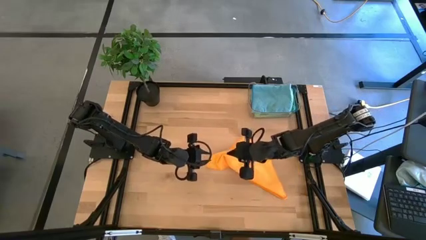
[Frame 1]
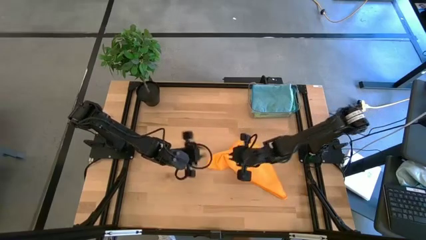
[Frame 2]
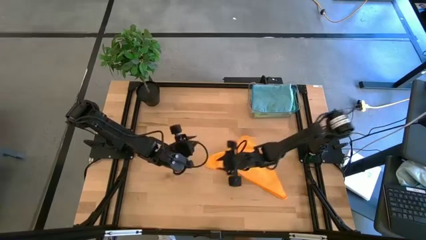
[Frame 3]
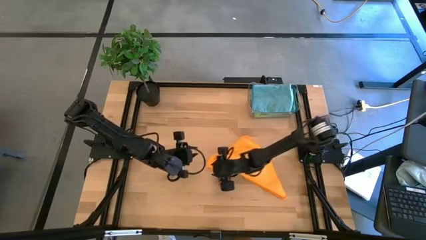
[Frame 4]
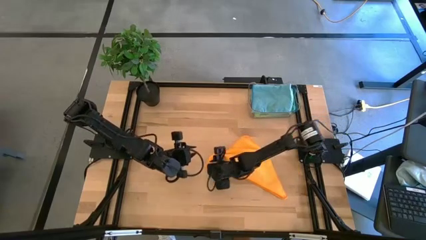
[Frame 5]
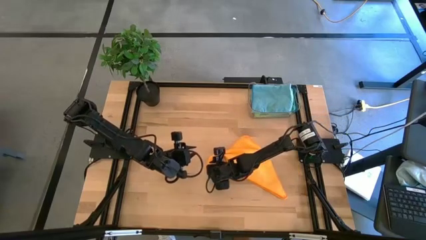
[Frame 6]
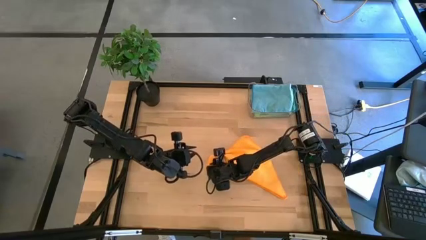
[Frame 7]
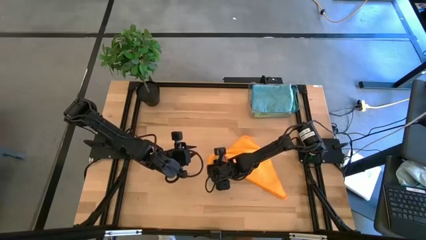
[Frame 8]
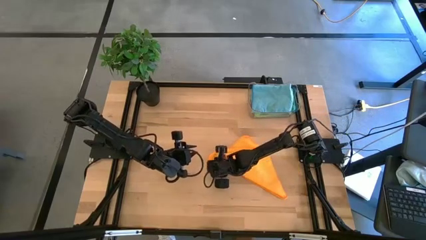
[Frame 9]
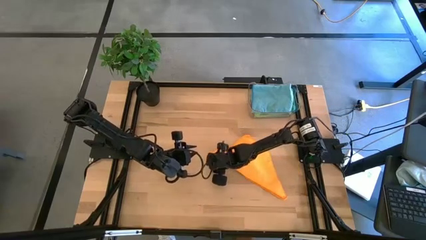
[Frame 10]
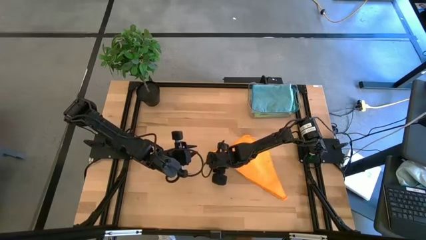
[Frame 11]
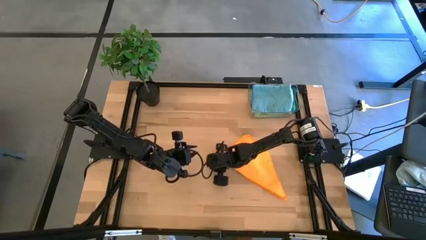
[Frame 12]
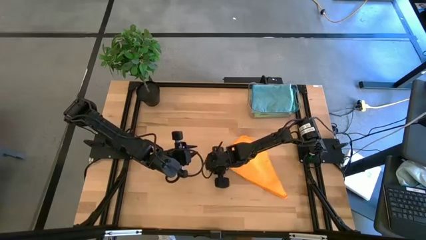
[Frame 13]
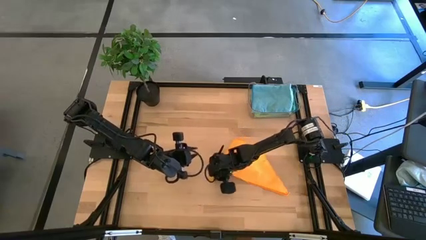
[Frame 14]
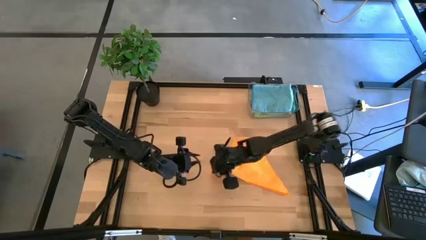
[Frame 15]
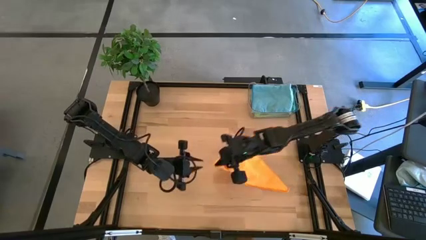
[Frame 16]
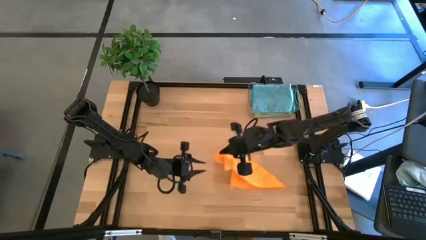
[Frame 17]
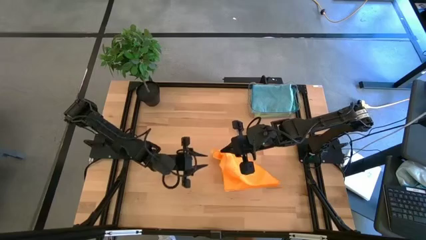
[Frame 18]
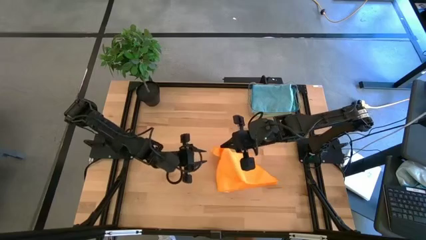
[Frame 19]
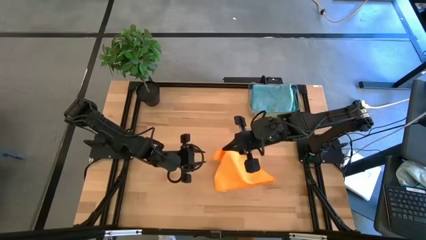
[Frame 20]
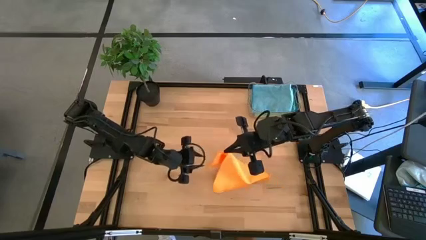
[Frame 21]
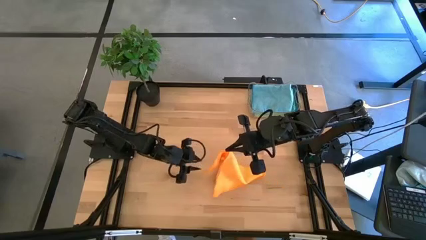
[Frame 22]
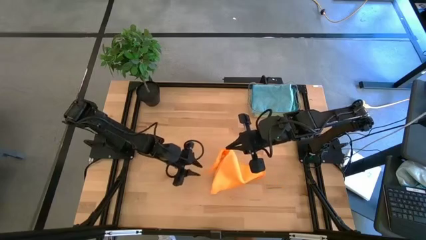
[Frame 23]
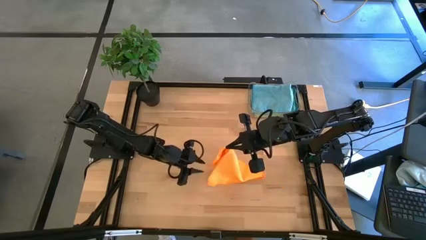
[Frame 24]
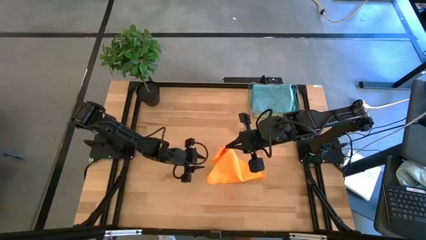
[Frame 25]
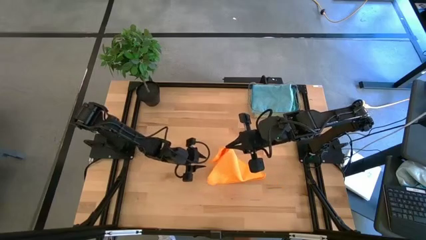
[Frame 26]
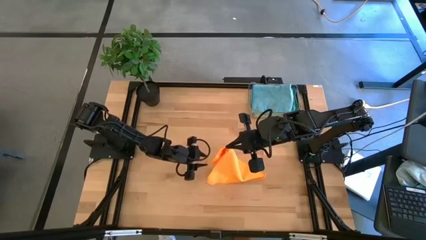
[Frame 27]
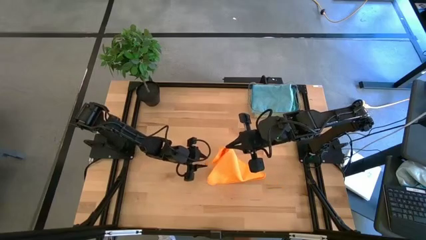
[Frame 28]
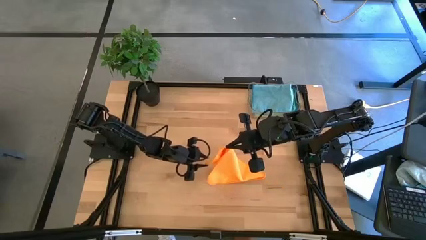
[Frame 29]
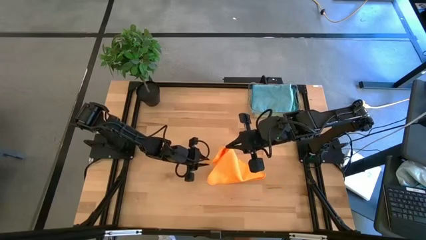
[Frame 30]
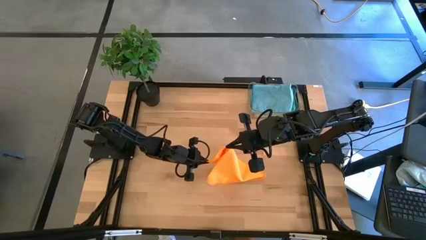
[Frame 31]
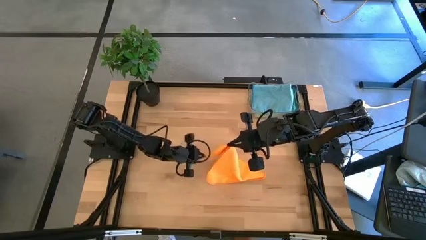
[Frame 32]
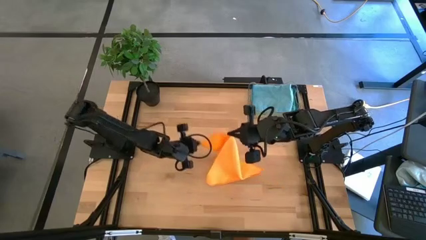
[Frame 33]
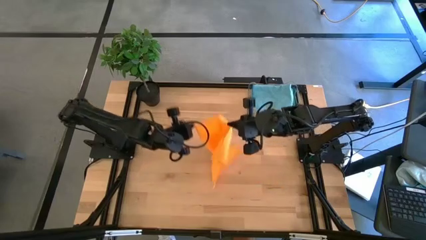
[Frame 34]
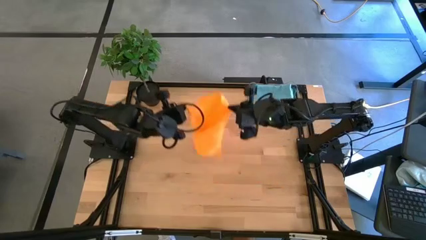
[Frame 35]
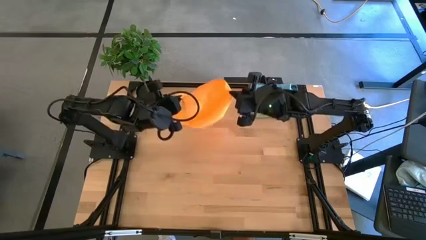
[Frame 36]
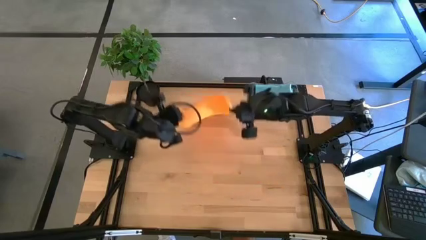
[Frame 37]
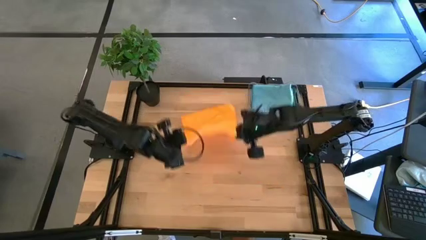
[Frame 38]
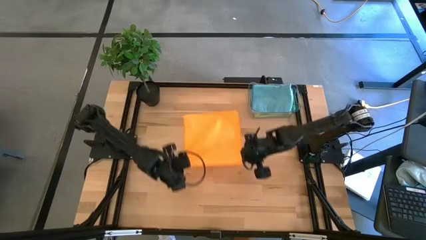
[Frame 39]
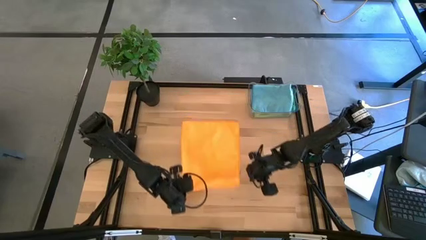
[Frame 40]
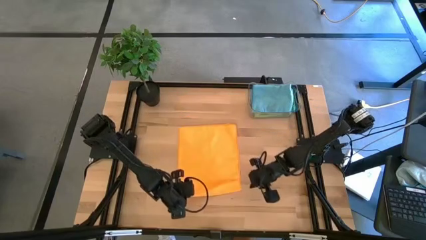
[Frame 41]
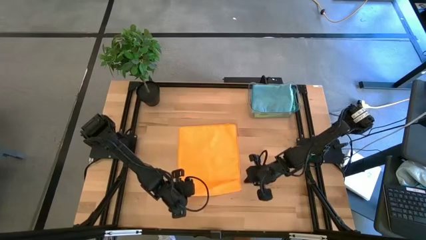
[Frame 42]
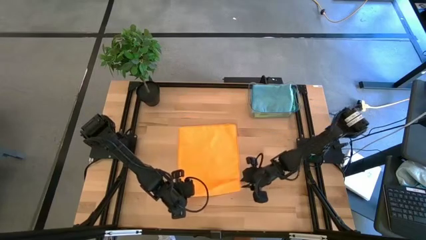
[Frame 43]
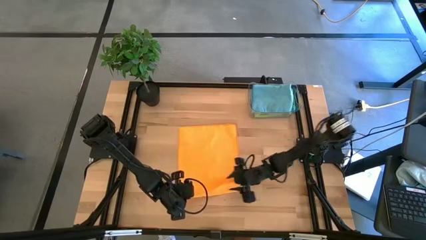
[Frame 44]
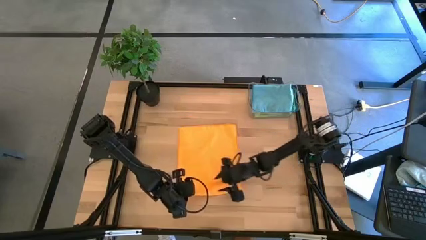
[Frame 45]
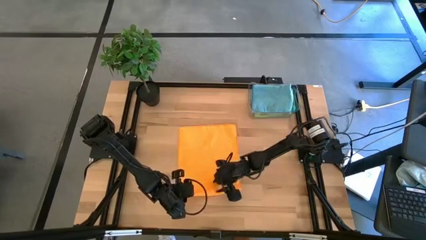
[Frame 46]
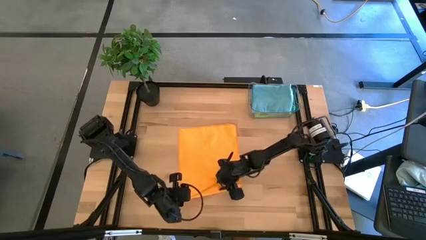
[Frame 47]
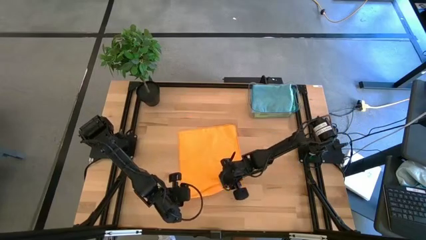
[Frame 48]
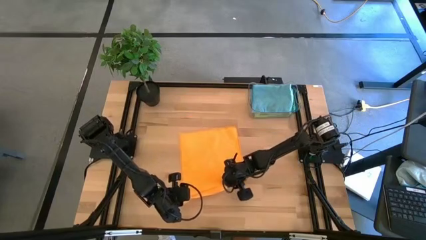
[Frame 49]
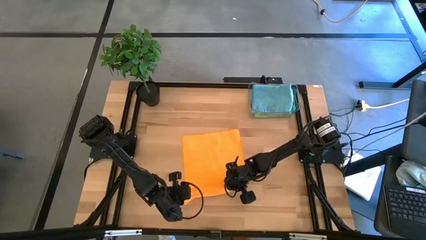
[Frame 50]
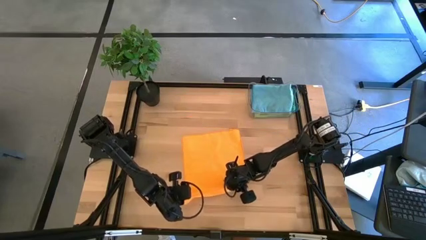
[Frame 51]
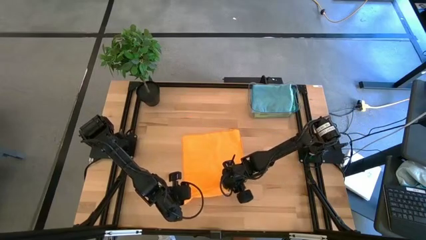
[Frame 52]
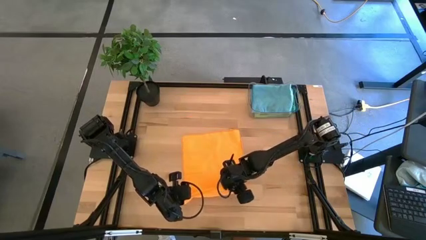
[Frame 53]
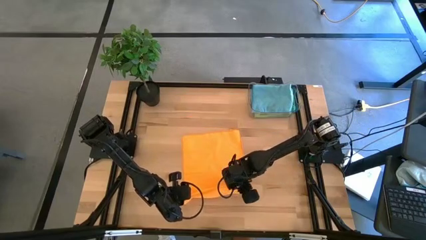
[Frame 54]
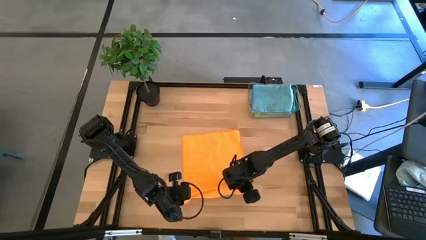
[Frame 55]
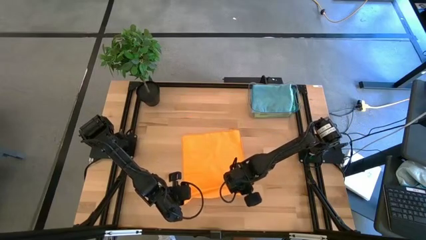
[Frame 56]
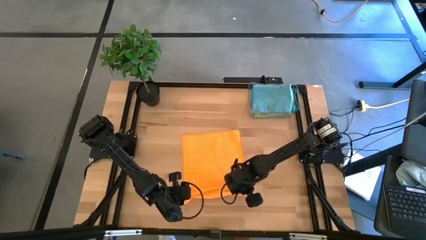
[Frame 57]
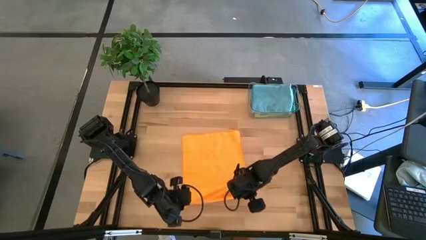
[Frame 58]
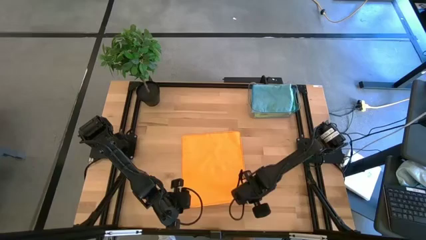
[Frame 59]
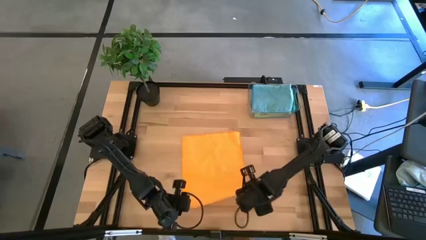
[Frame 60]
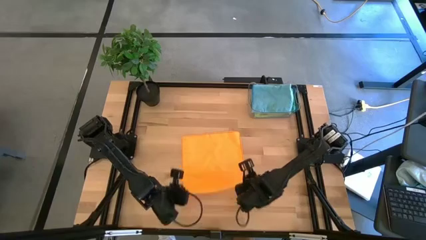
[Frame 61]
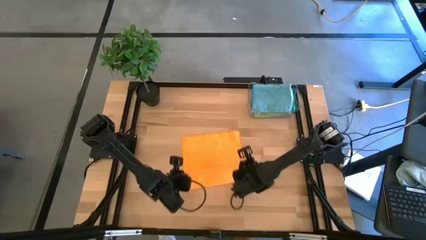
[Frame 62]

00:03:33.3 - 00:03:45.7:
Task: Fold microfiber towels
Fold the orange microfiber towel

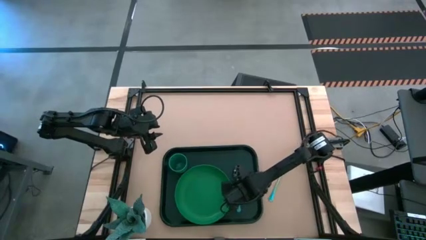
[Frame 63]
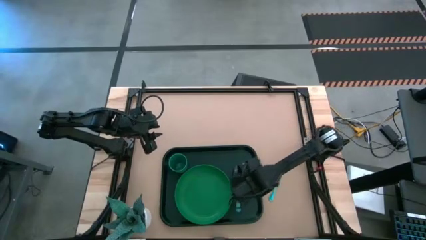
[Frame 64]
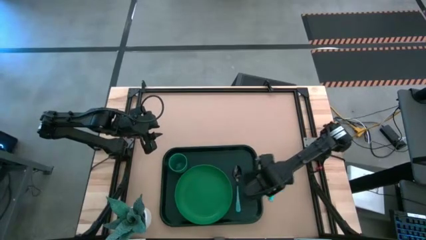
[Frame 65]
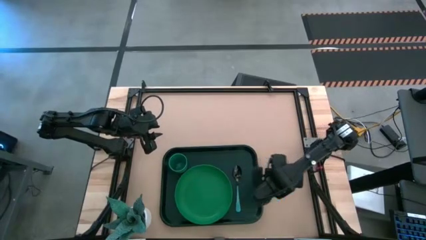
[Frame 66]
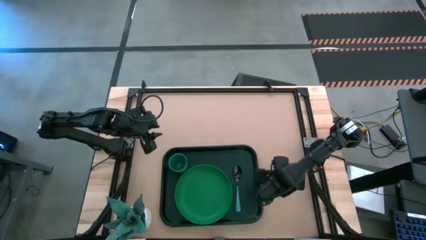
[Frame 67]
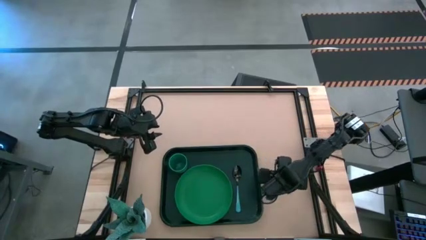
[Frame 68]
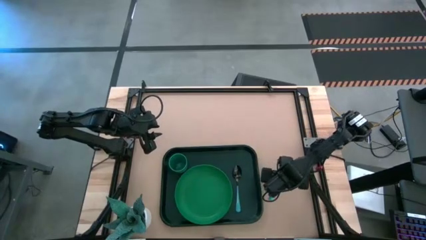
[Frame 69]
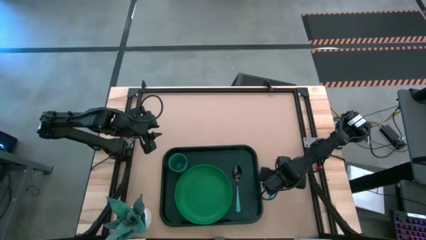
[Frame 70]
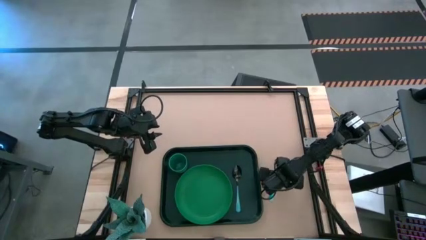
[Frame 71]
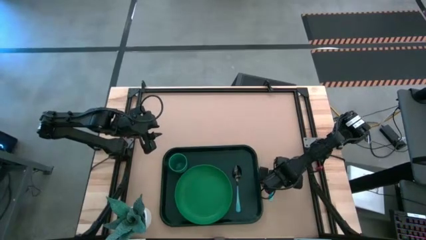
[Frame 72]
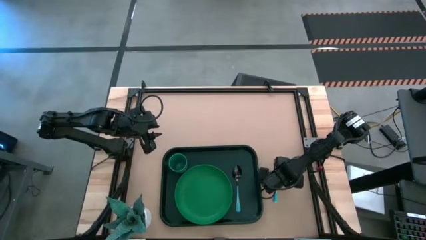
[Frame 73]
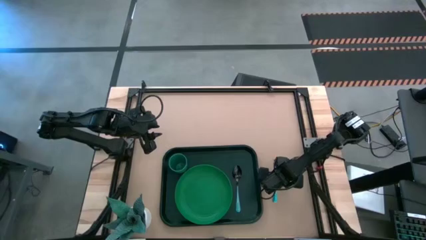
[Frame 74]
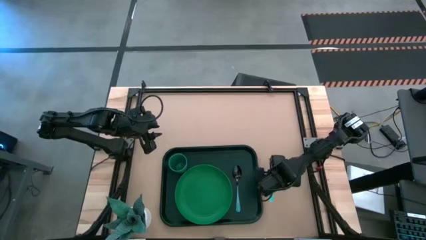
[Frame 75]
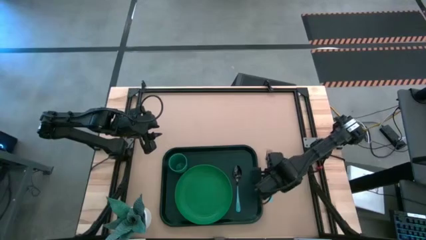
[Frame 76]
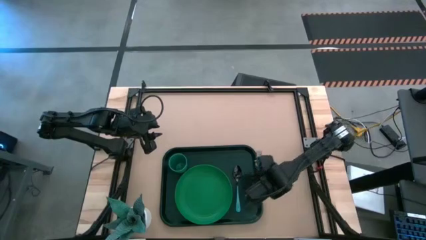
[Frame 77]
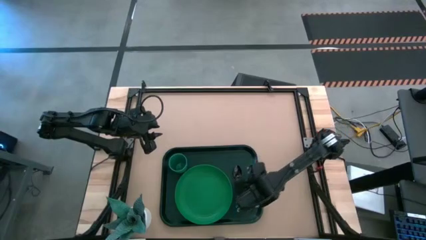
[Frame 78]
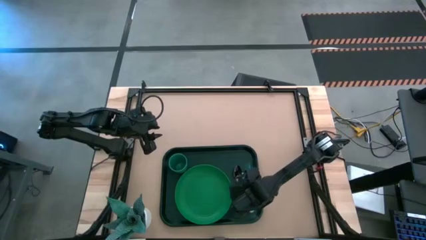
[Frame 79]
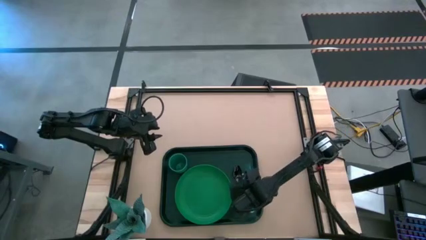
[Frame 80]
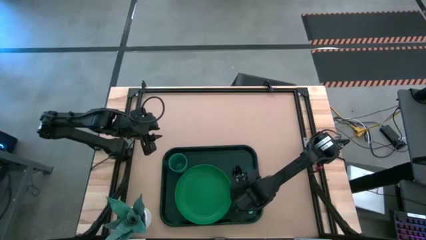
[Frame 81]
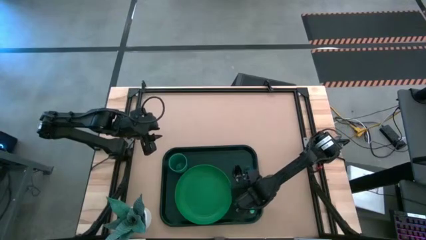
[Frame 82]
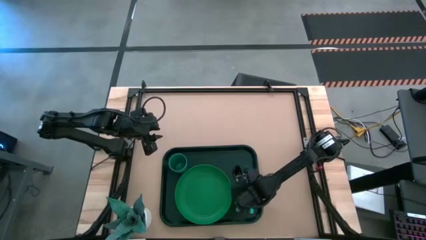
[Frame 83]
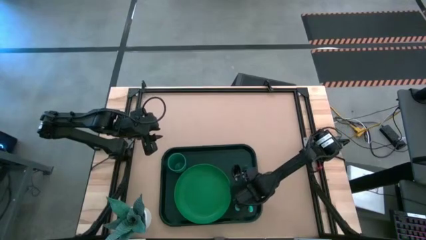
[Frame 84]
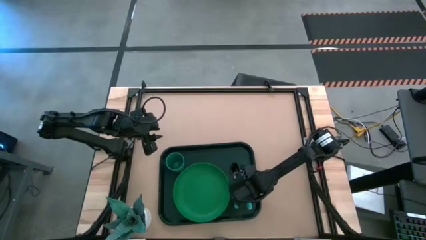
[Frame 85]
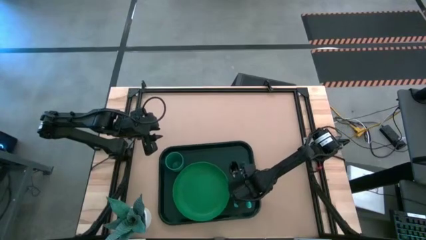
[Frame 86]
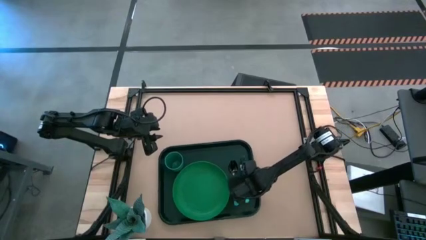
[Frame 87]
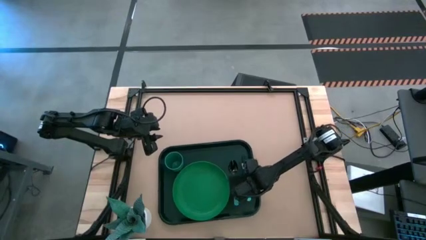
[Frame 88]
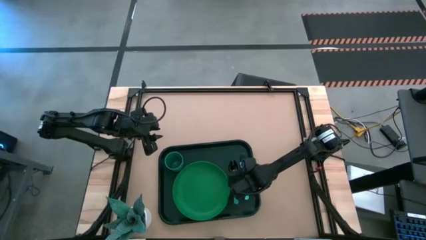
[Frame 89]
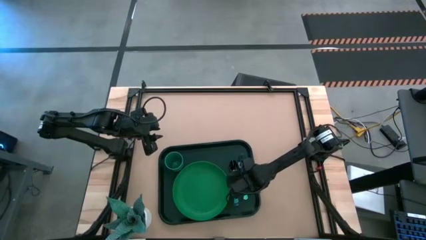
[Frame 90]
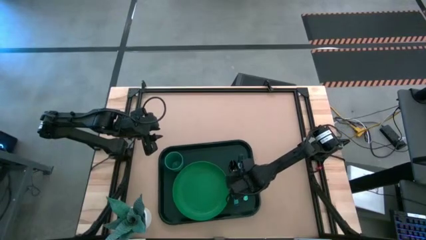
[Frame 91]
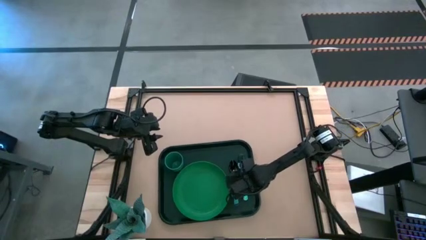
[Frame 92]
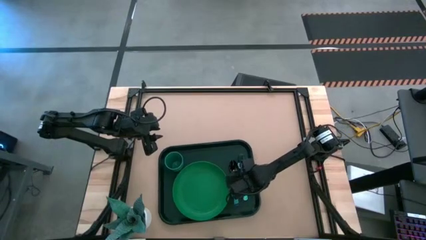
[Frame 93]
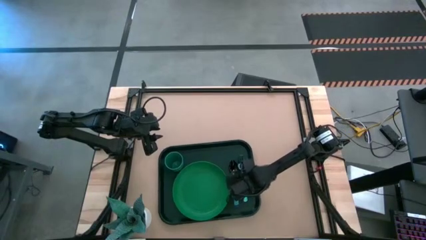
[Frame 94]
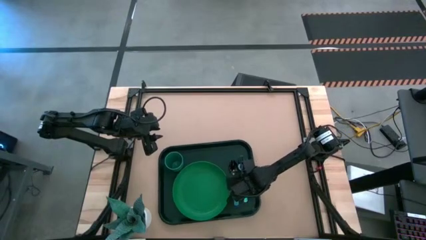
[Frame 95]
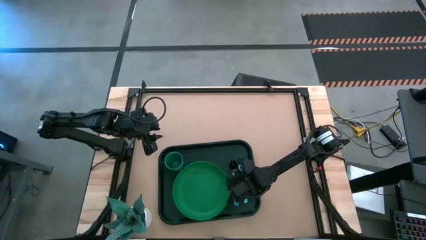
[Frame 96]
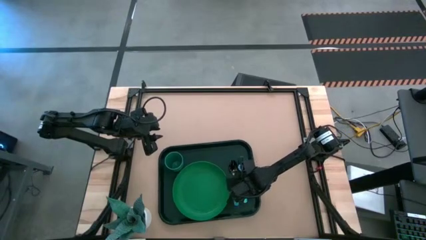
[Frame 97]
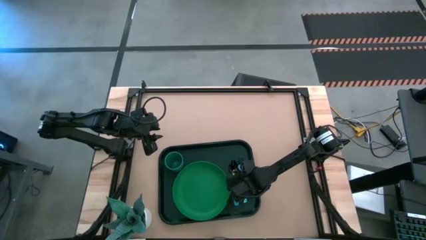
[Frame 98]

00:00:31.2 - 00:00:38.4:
Task: Pick and place plate/cup/fork/spoon on tray
Put the iridescent fork on the dark green tray
